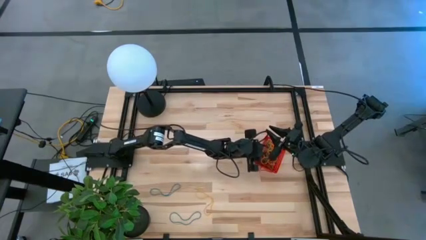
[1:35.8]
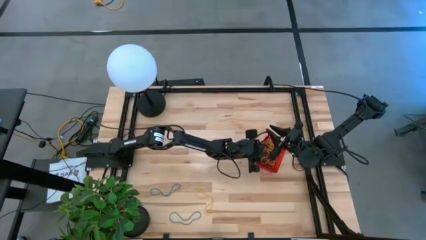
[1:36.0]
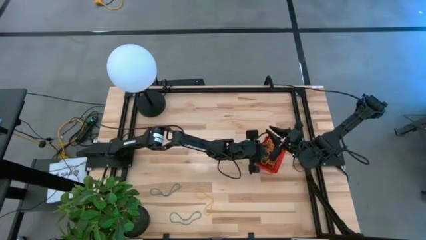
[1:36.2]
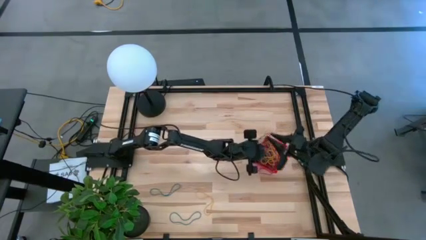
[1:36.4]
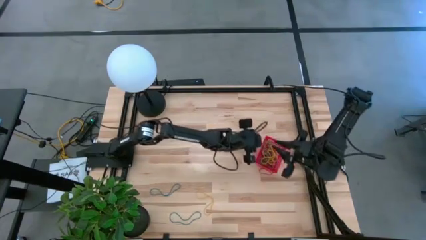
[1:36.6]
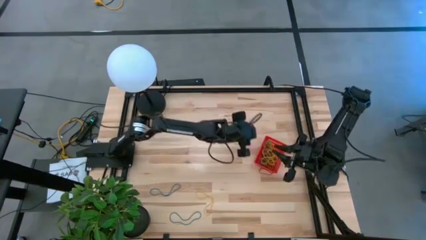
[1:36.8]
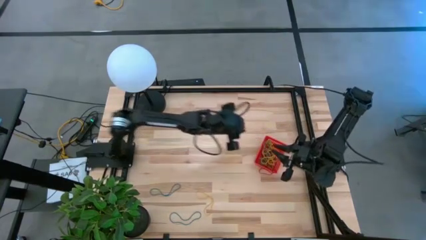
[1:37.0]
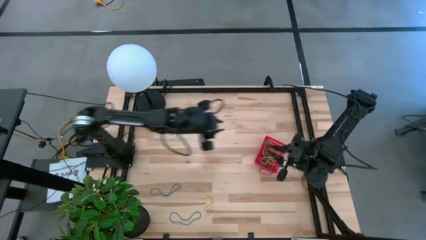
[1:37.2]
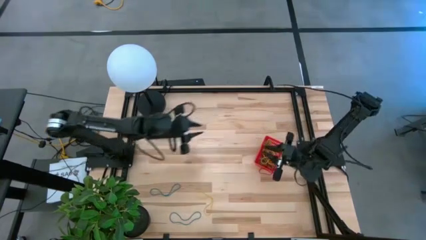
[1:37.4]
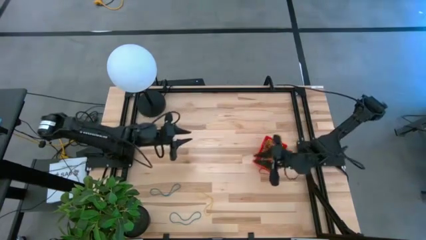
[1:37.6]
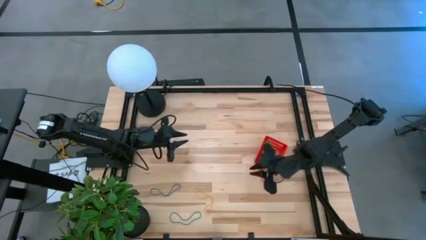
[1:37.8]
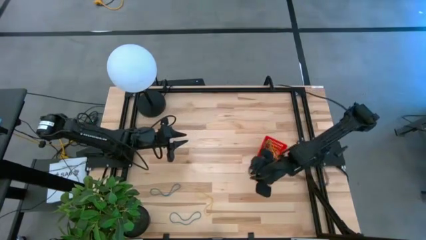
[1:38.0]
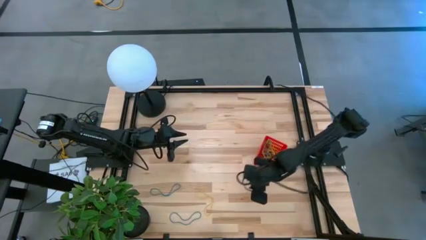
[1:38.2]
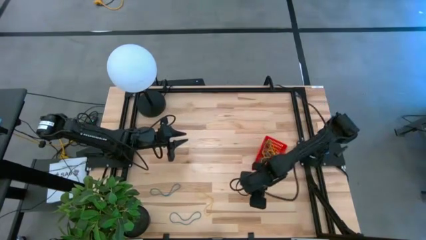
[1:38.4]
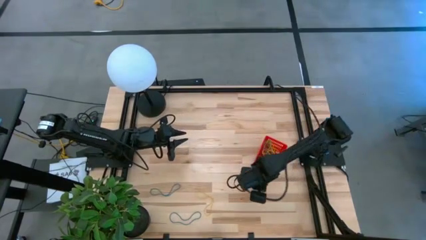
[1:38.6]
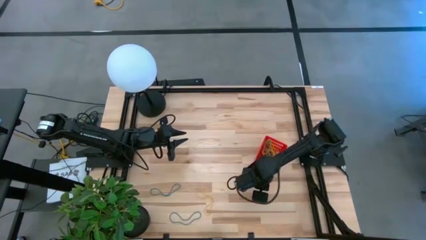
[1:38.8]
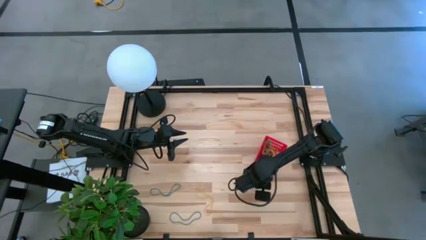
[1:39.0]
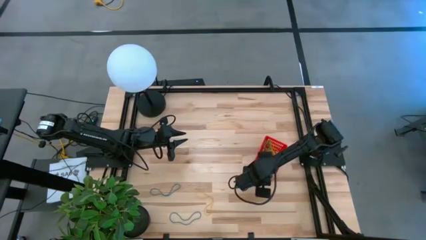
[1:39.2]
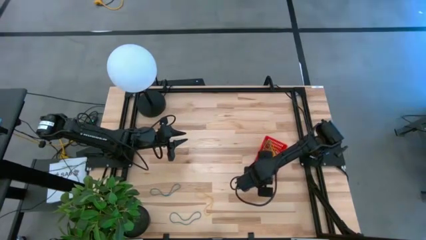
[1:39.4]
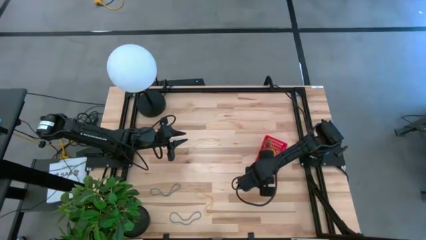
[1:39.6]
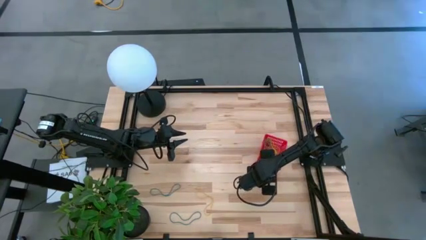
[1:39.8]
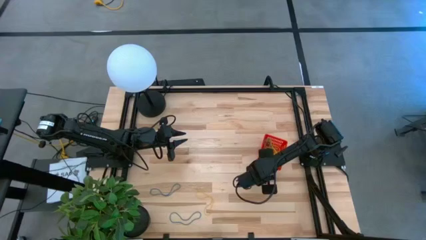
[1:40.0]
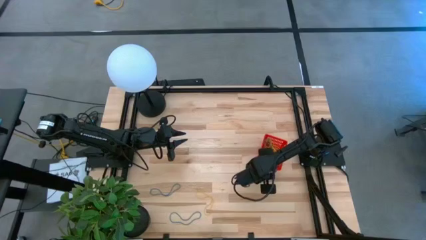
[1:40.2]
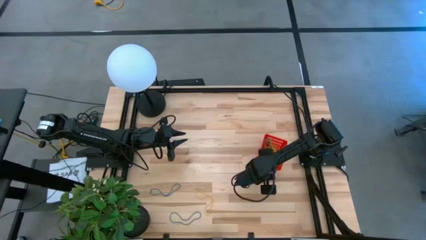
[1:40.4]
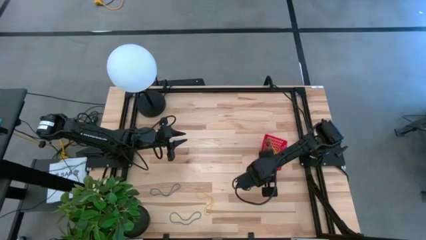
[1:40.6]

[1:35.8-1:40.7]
Task: Pick and place rubber bands into bin
Adjust the red rubber band inside the basket

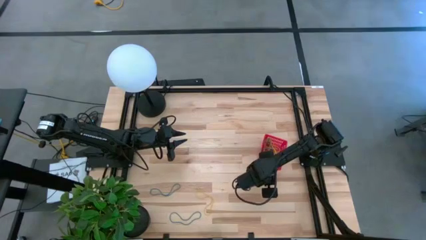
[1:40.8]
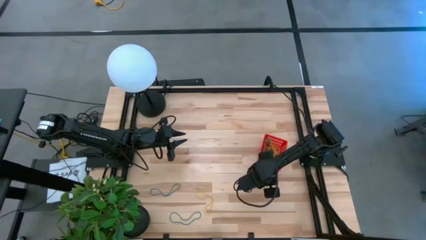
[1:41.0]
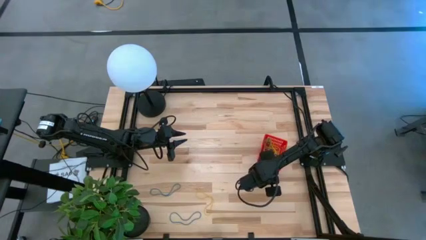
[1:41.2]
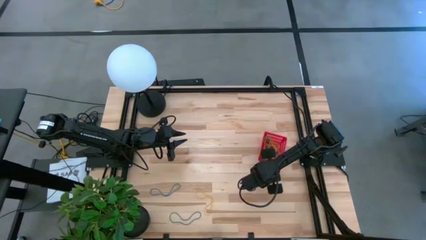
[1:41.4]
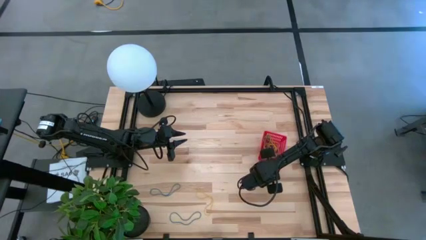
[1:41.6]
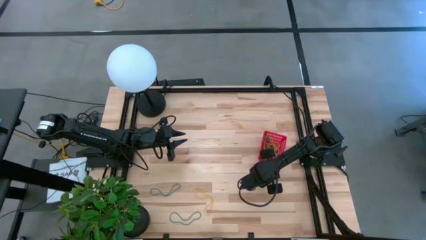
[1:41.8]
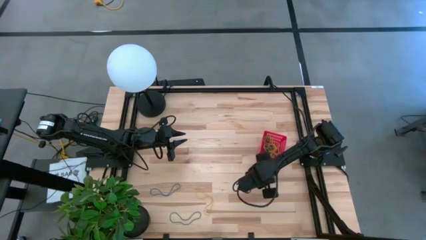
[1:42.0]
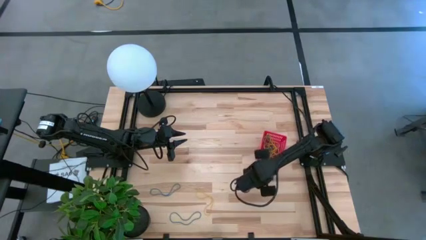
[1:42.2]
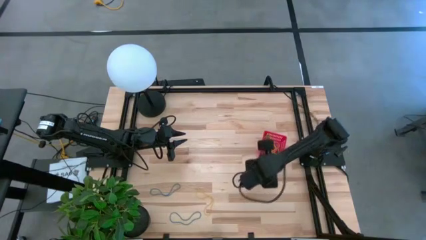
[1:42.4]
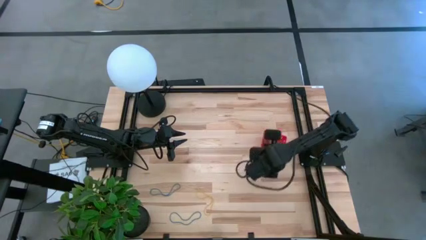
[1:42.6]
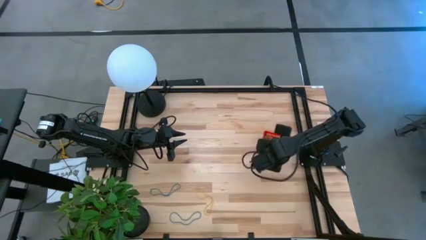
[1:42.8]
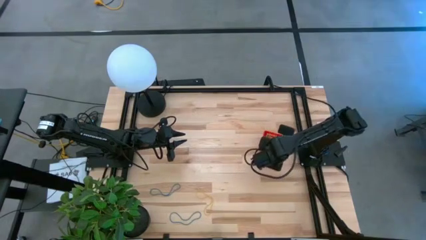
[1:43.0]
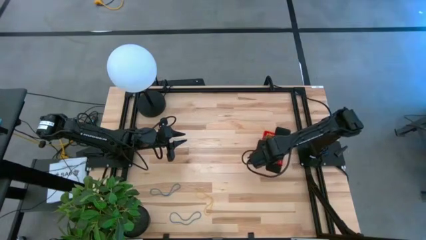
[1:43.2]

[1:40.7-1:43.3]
Adjust the red rubber band inside the basket

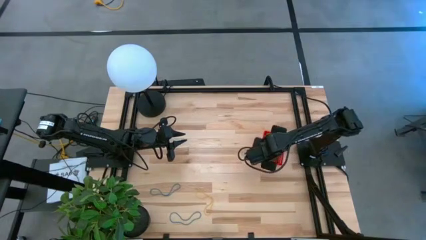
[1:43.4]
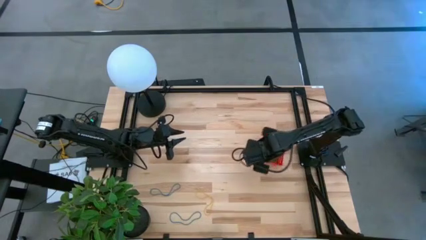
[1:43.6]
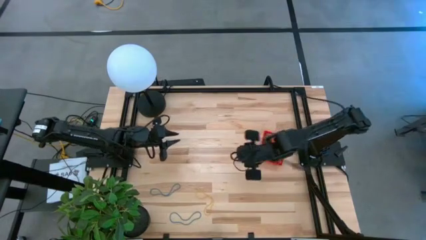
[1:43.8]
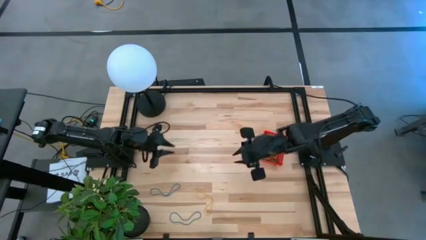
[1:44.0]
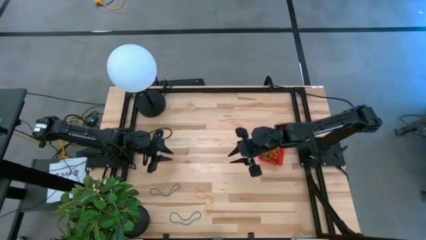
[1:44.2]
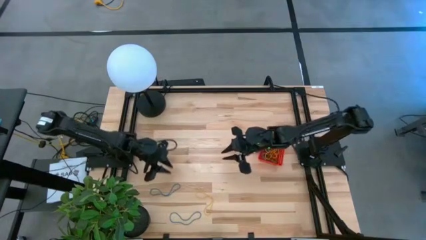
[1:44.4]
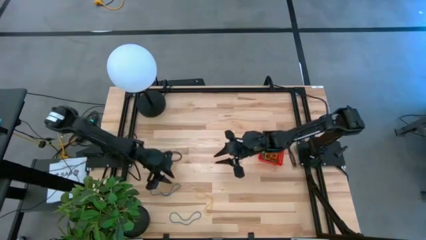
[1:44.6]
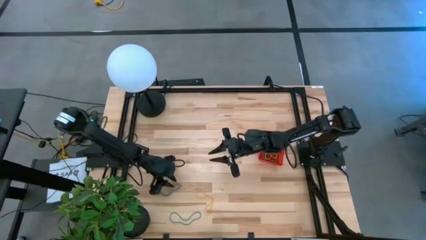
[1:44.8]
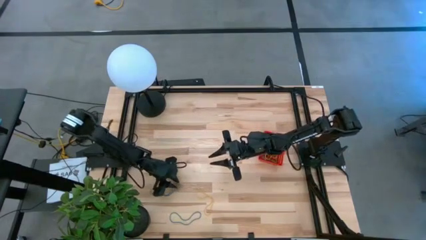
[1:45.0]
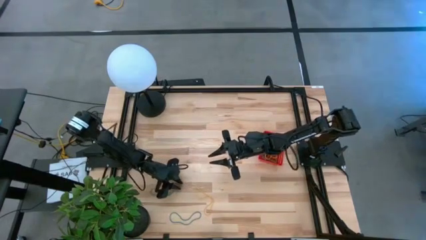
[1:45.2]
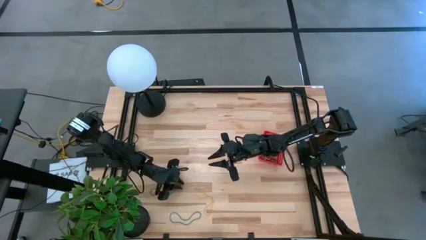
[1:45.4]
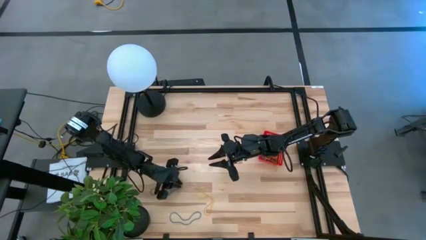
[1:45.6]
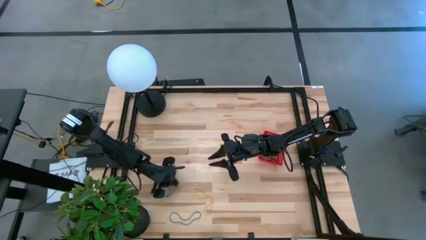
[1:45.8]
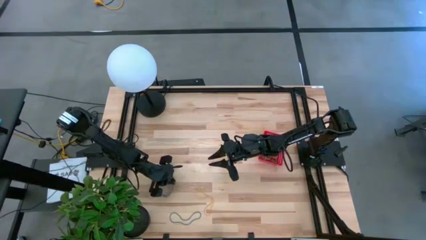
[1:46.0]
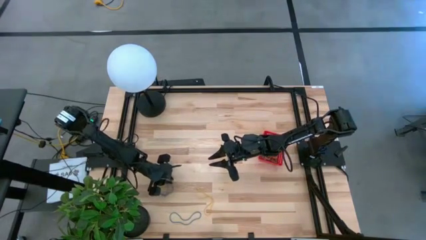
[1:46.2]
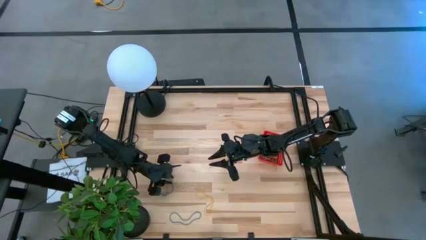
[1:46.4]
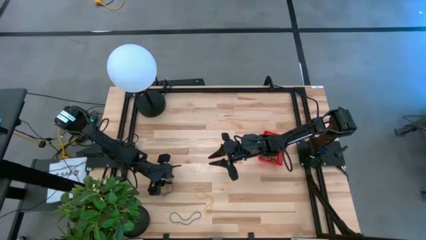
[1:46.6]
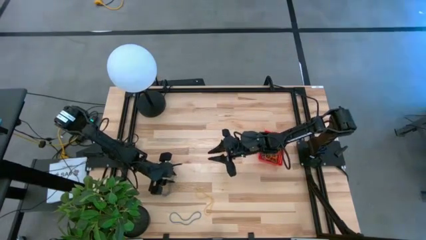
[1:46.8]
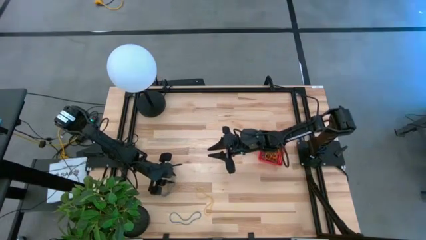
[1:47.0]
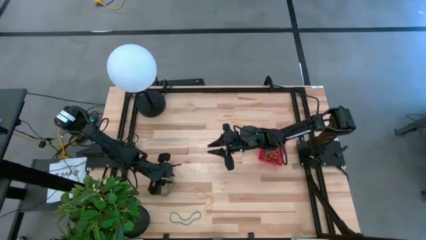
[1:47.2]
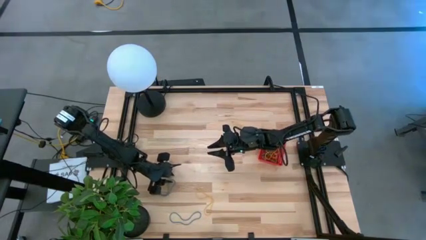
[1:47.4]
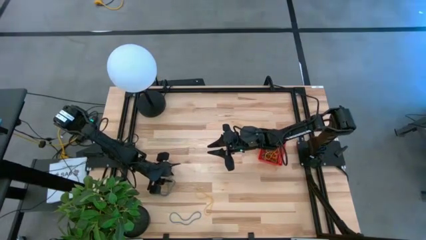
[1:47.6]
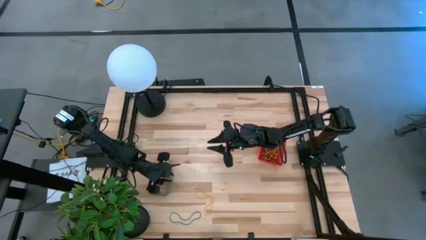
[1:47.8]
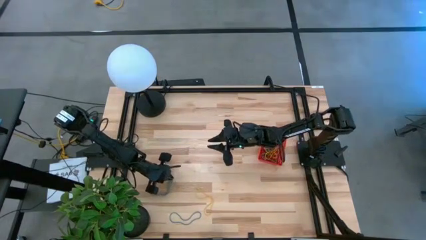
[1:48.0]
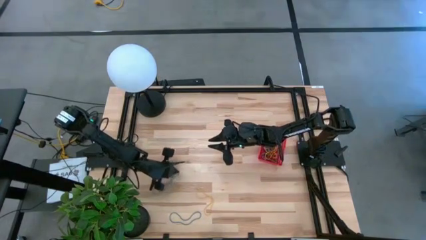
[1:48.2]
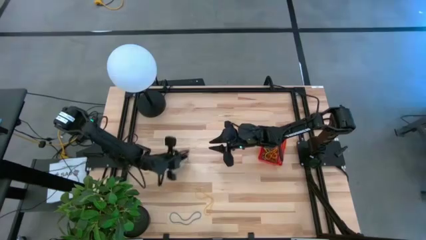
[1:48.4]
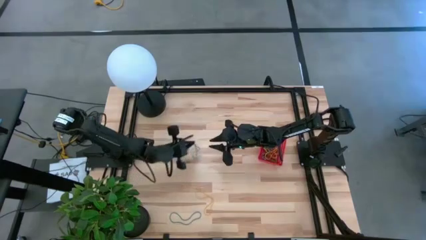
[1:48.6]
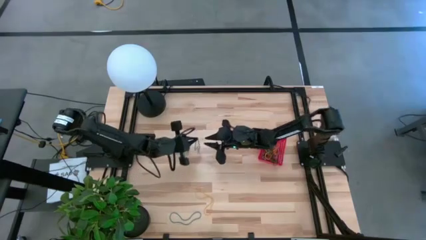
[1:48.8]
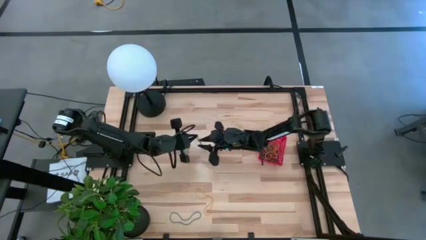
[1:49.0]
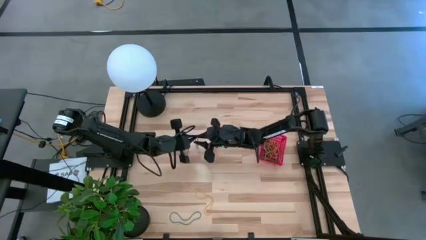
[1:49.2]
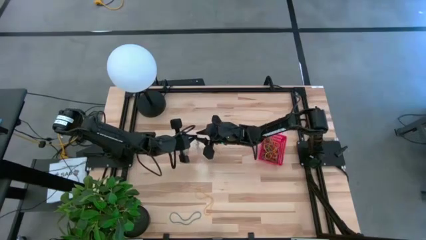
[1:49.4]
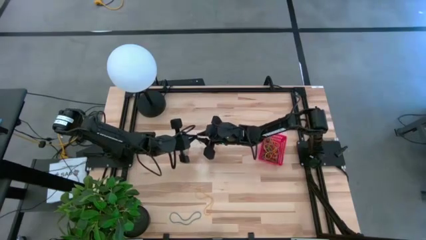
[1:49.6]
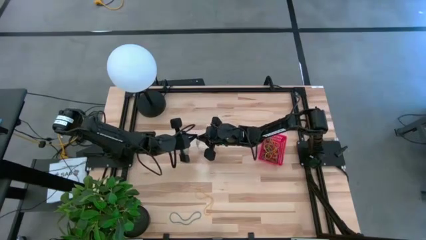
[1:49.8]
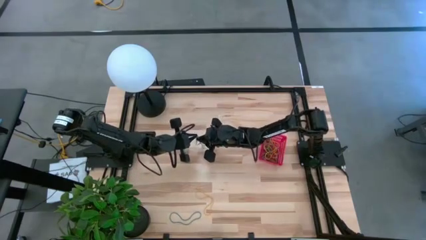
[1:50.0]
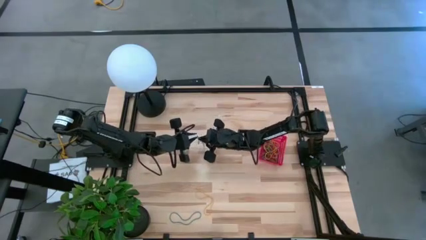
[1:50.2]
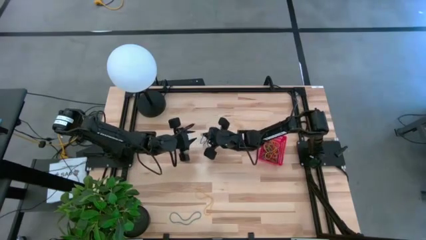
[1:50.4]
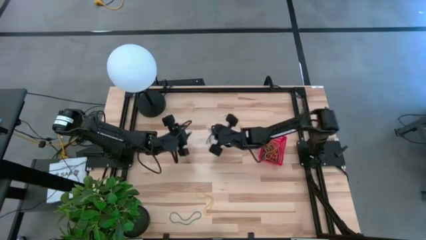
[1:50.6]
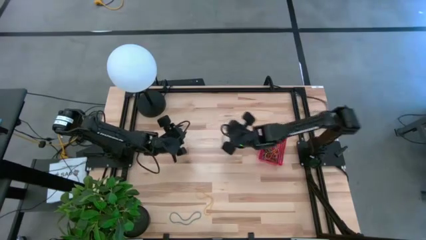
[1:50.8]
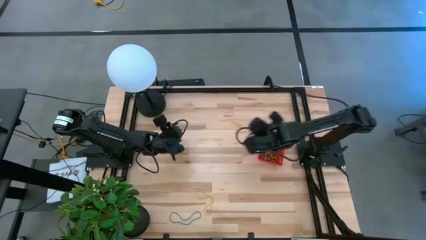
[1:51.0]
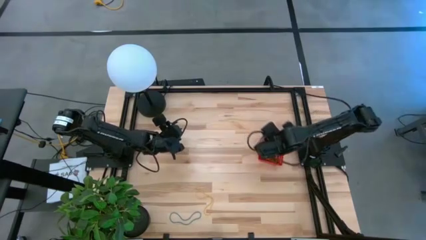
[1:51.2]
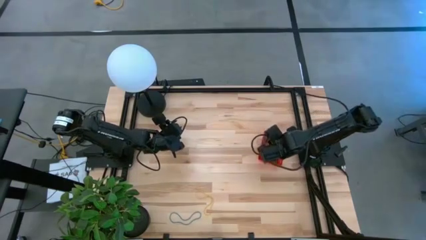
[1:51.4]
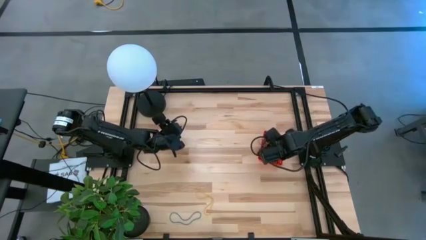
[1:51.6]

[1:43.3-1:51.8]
Put the blue rubber band into the basket

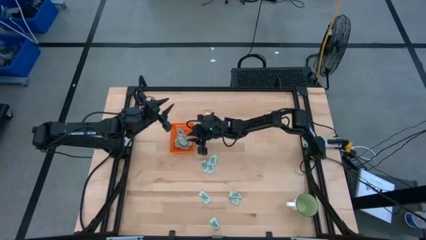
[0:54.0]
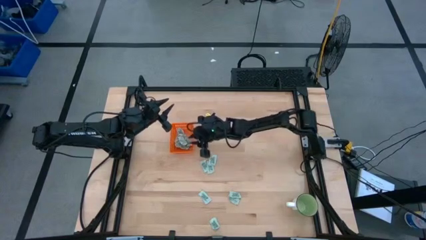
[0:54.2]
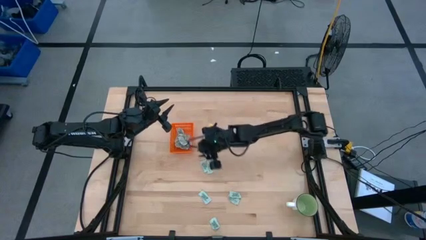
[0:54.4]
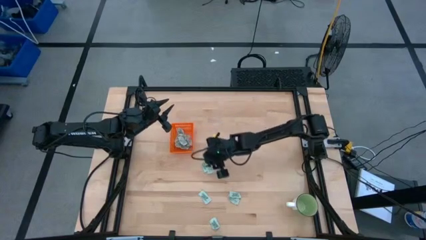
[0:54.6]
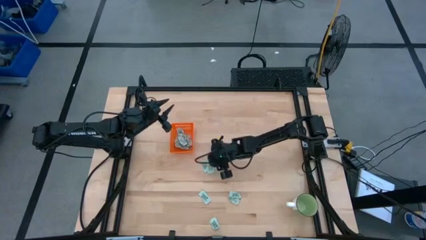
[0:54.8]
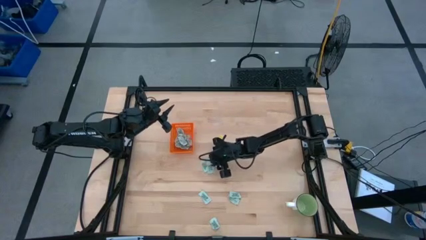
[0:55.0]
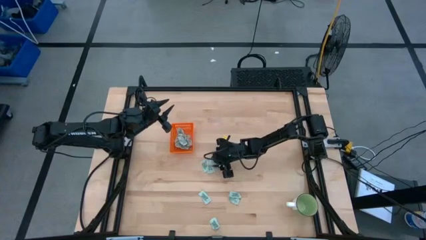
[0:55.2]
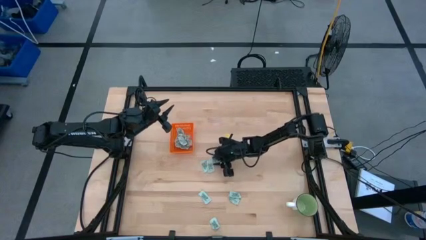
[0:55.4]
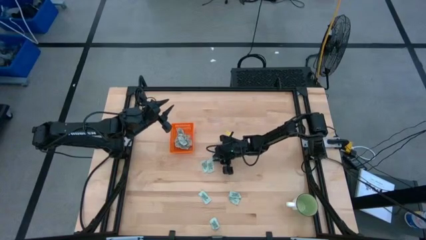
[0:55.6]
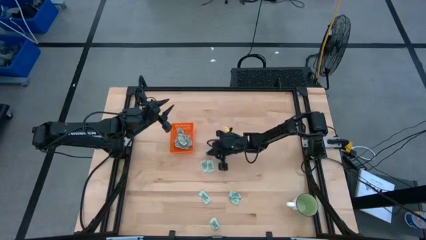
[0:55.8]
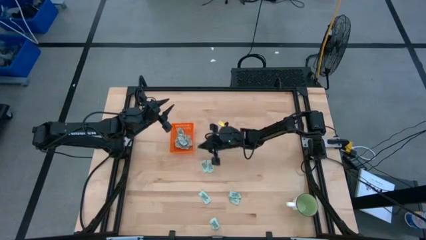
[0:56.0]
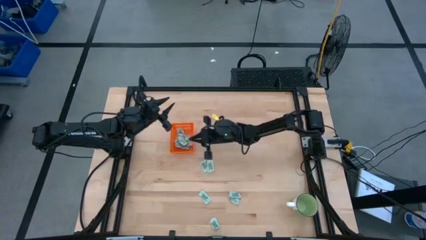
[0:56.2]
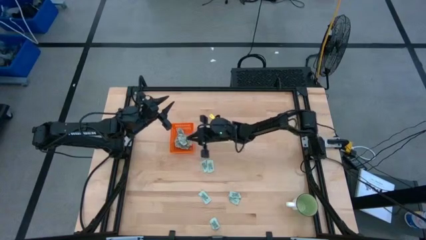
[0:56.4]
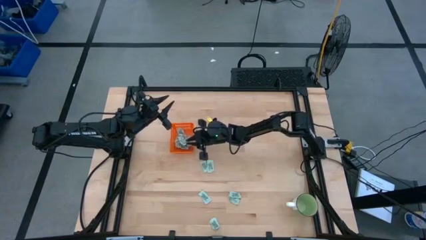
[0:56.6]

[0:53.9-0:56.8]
Task: Pick and place Stevia / Truvia into bins
Put the green stevia packet into the orange bin
